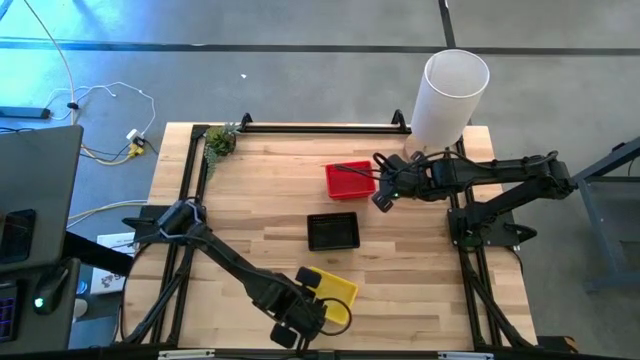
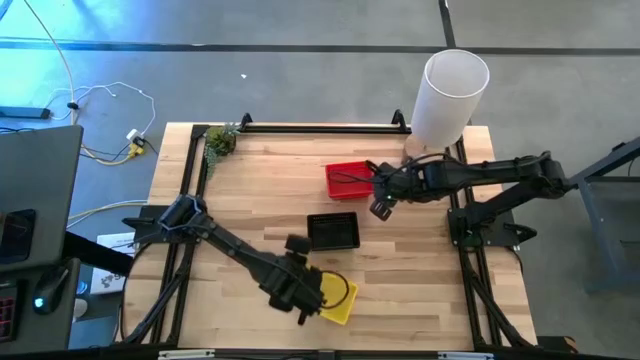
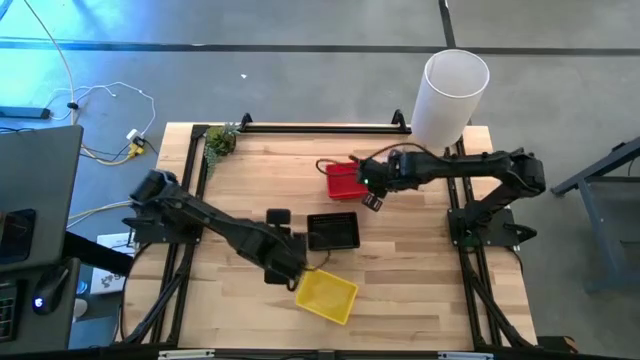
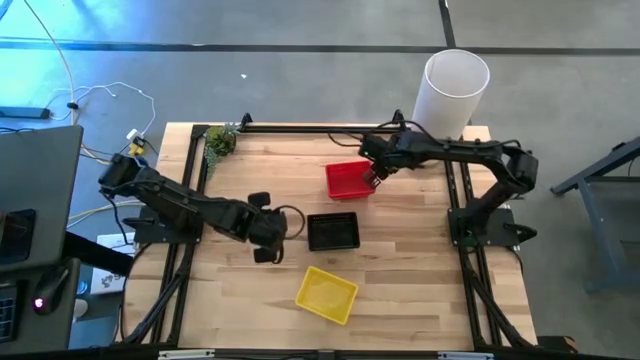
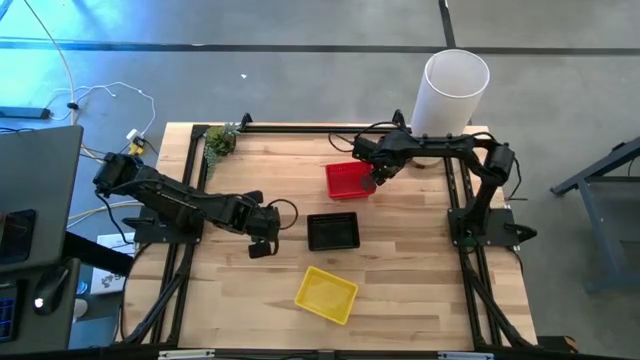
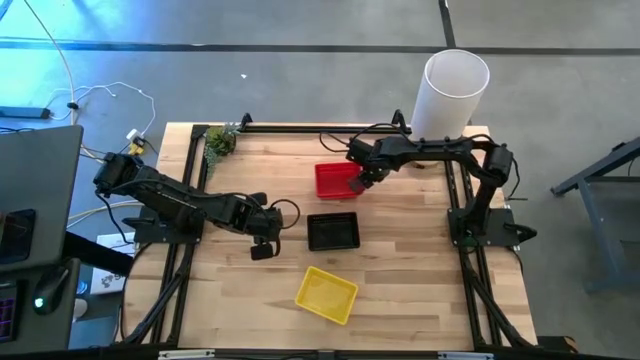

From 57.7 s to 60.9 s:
Adjust the stacked red bins

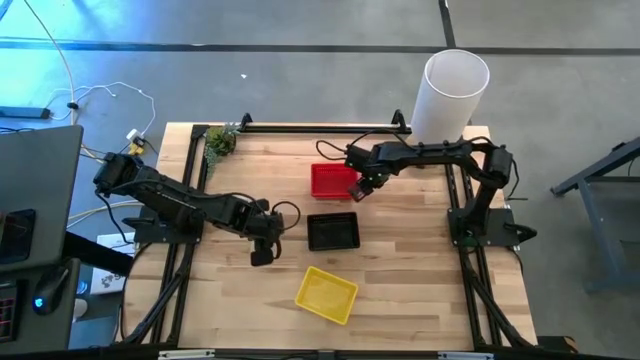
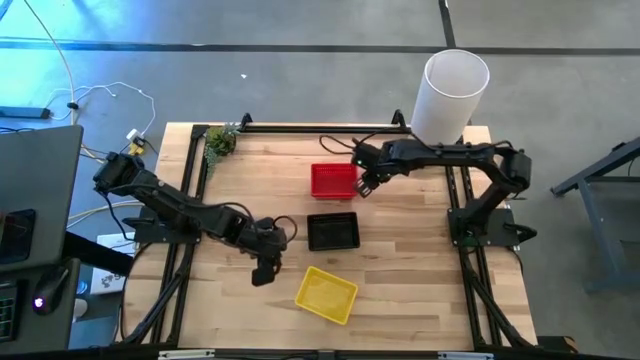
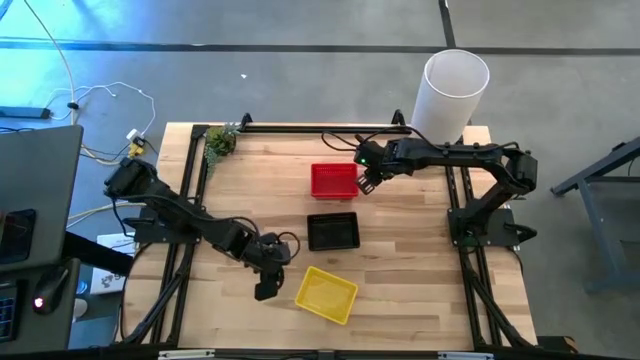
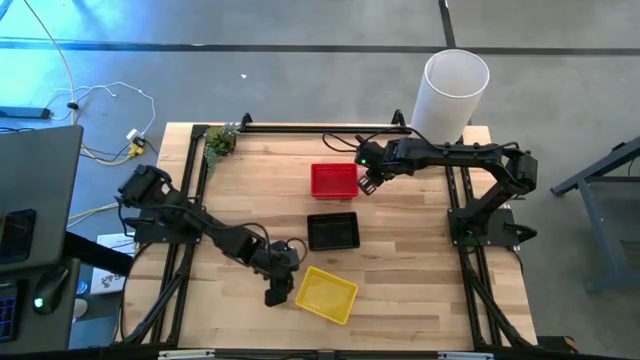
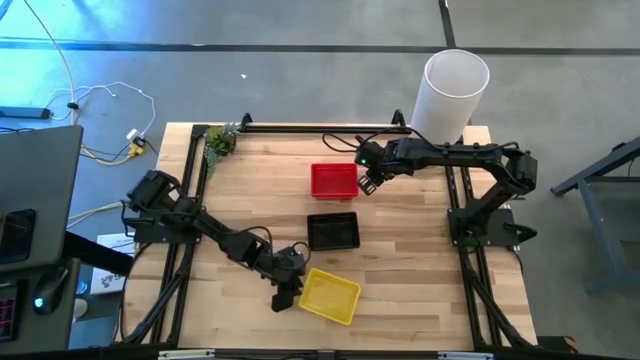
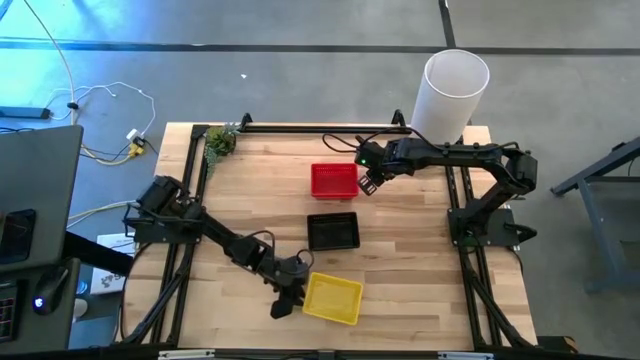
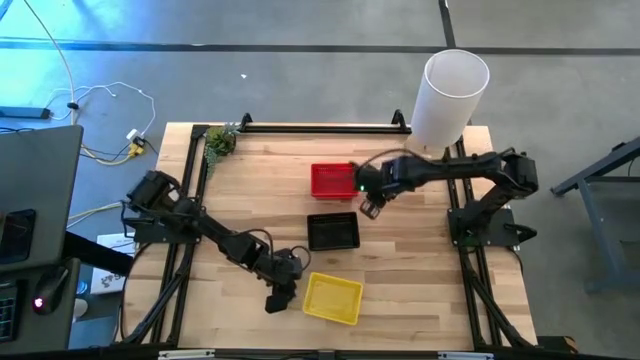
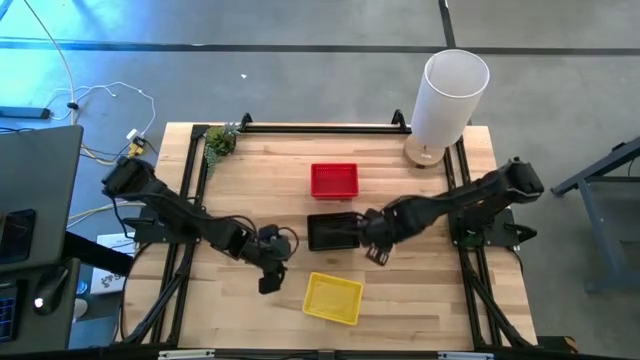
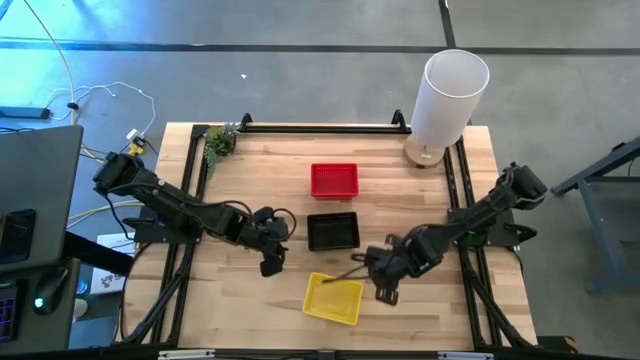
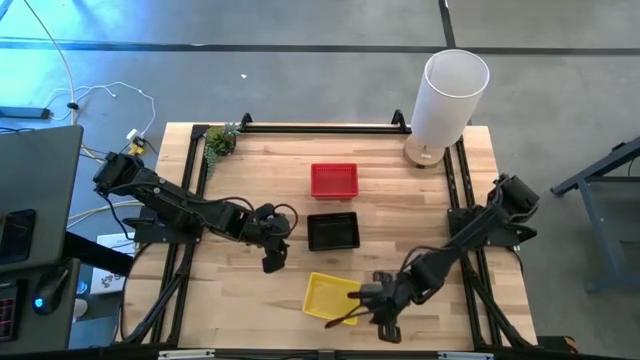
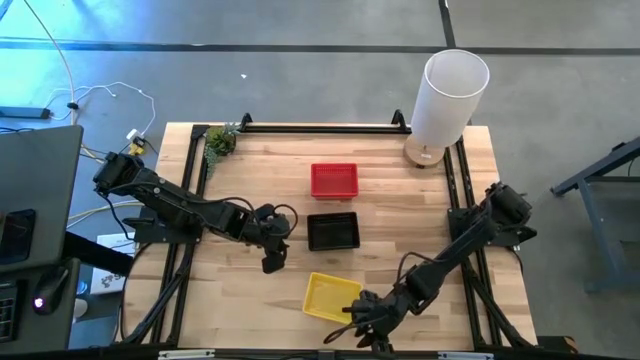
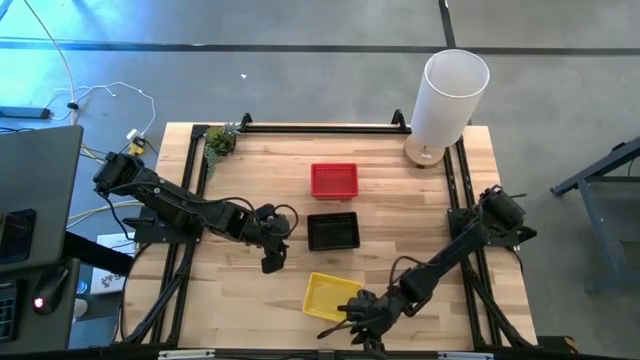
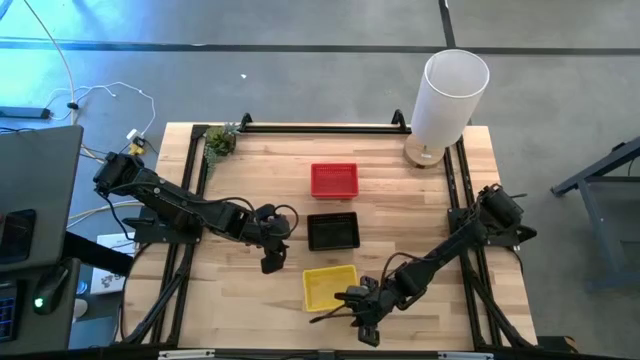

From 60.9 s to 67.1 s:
Adjust the stacked yellow bins

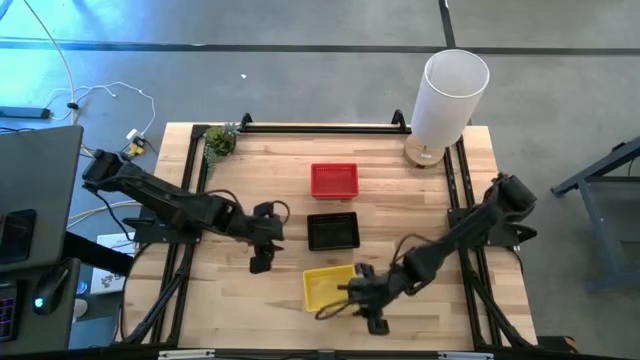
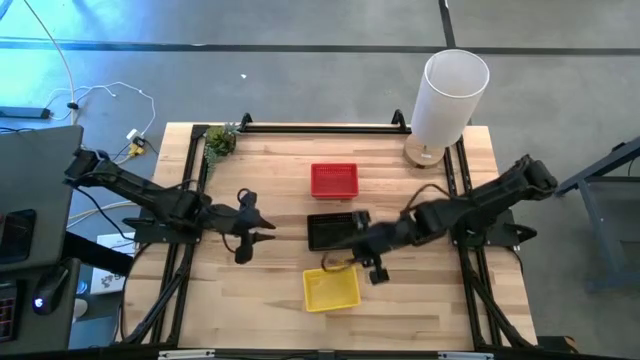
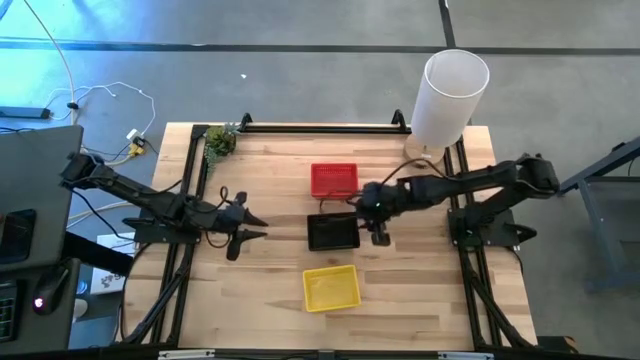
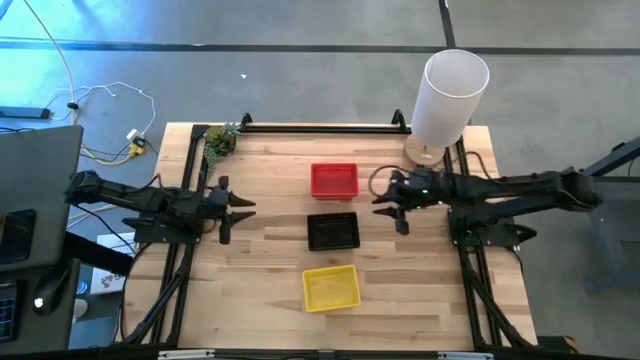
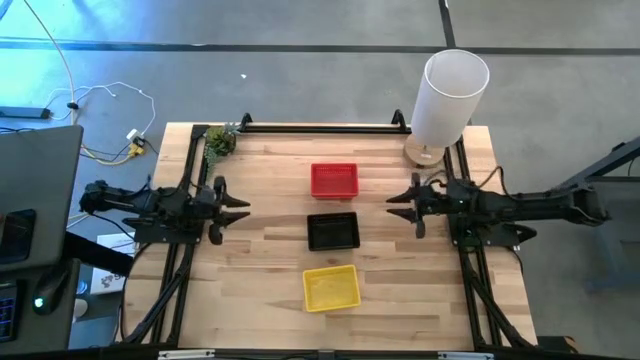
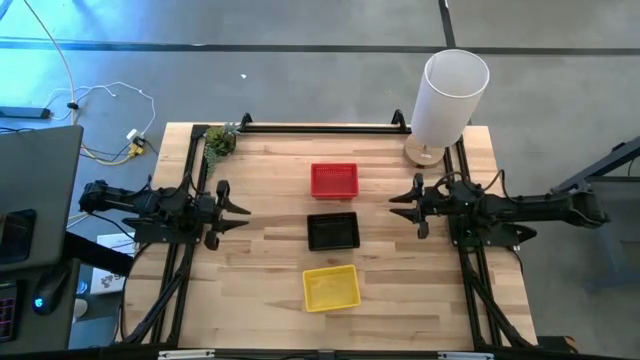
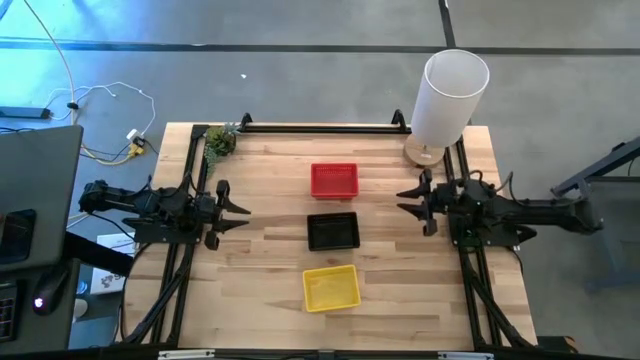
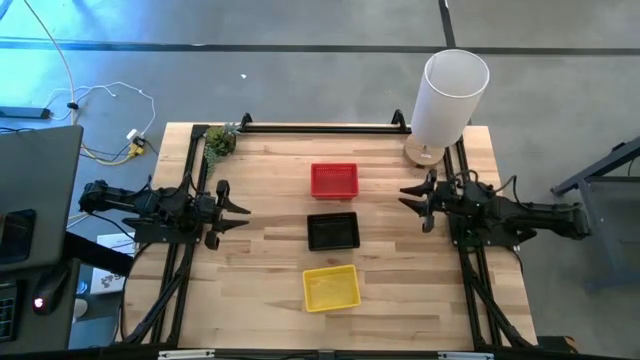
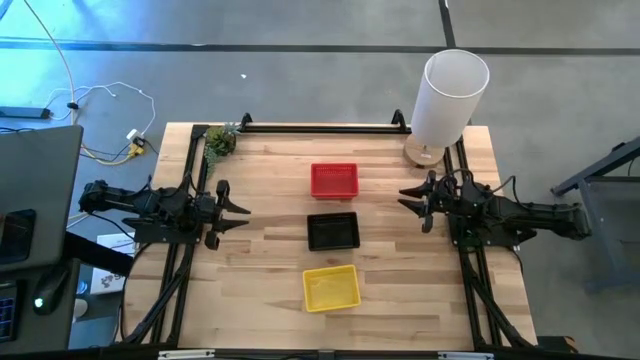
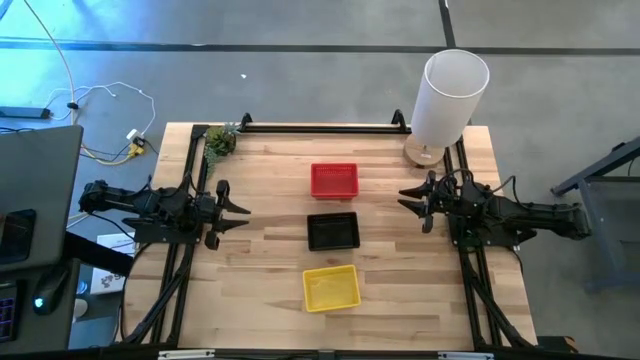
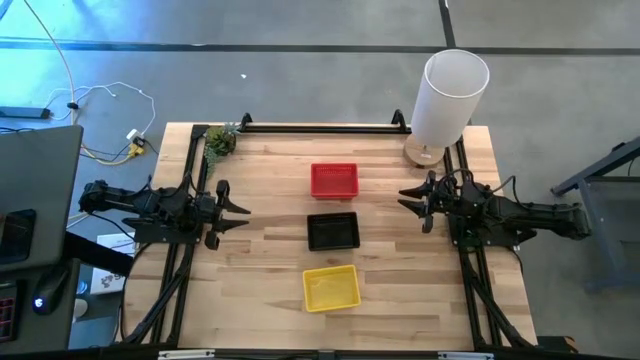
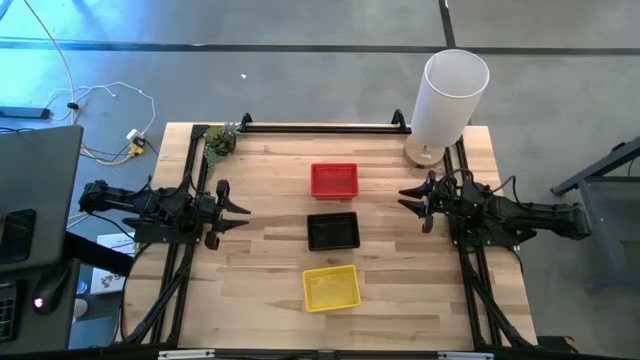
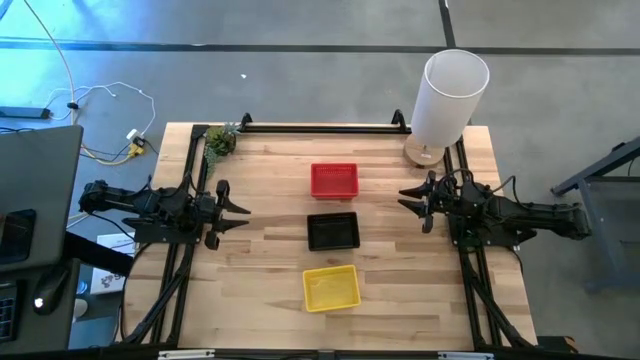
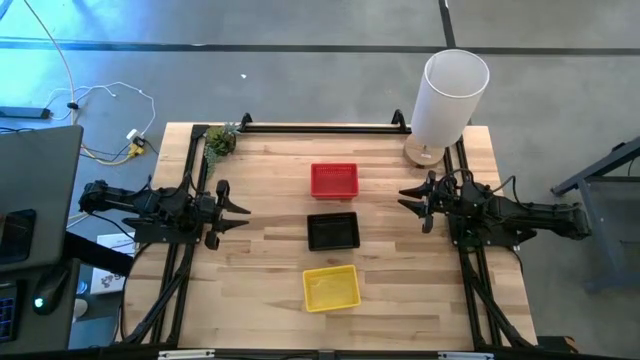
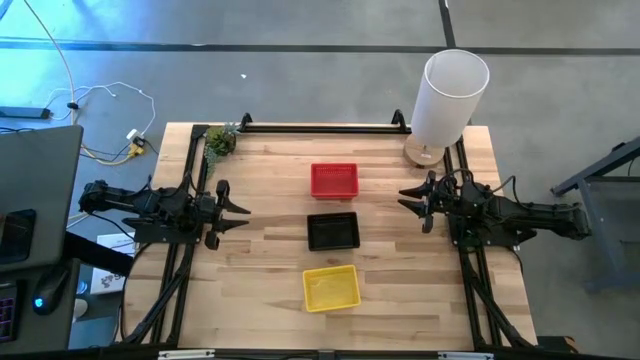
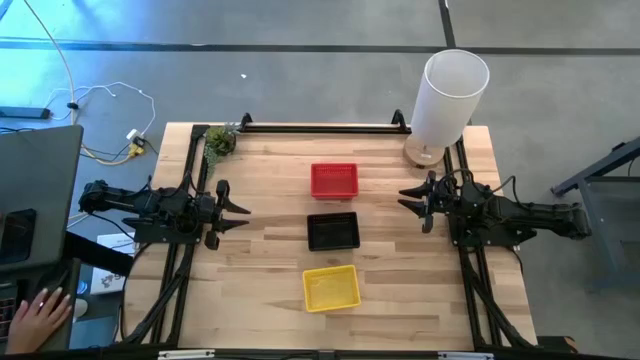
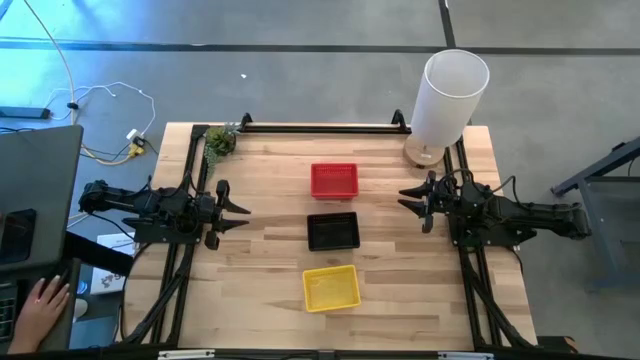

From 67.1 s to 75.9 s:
Return to Home Position
